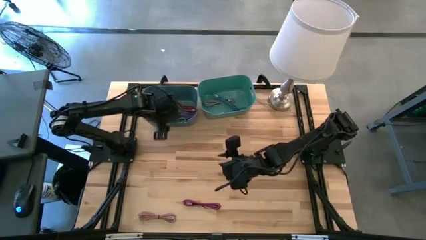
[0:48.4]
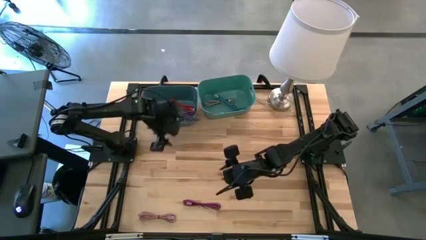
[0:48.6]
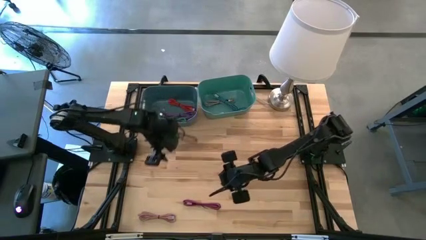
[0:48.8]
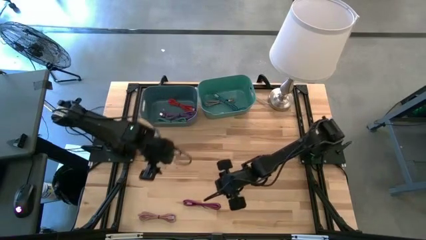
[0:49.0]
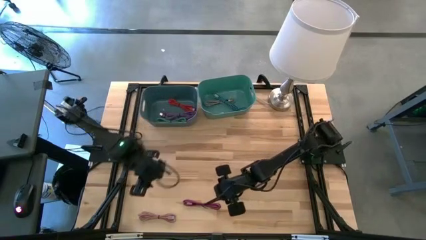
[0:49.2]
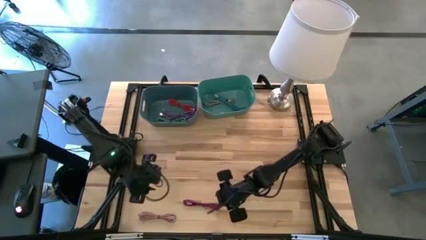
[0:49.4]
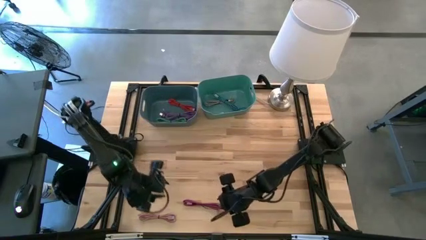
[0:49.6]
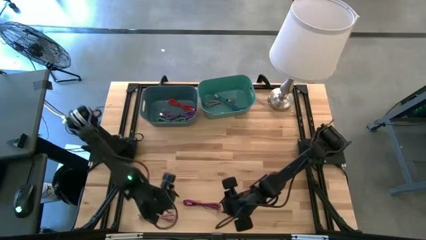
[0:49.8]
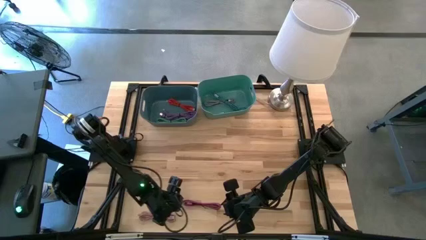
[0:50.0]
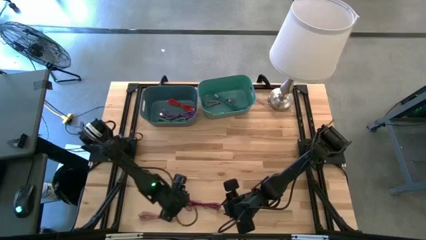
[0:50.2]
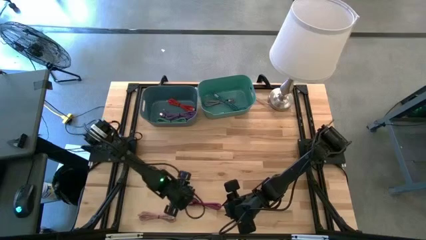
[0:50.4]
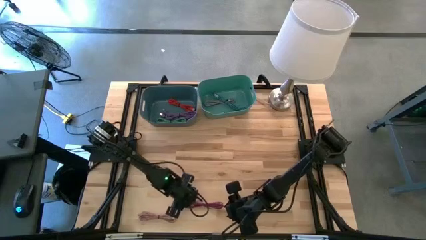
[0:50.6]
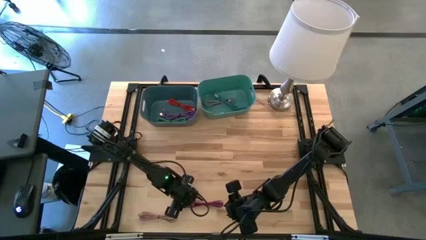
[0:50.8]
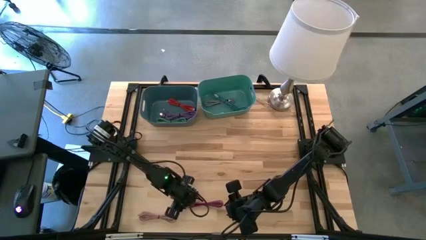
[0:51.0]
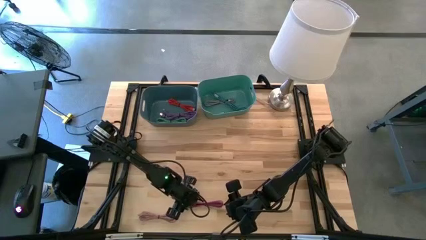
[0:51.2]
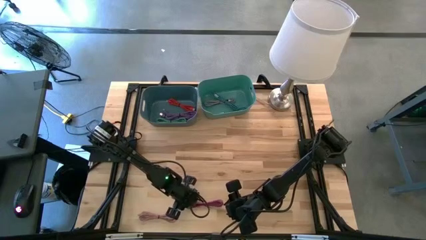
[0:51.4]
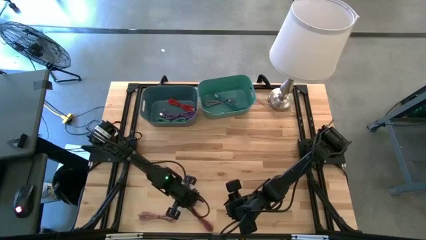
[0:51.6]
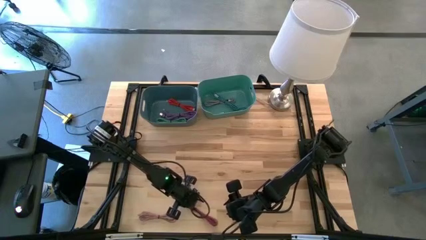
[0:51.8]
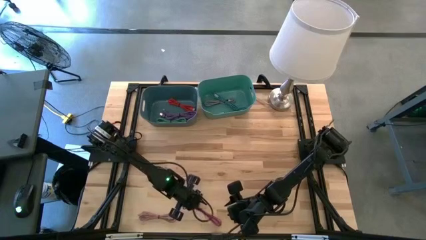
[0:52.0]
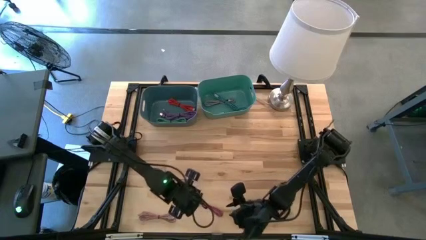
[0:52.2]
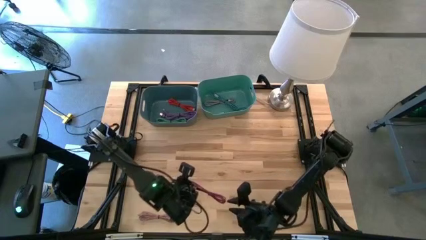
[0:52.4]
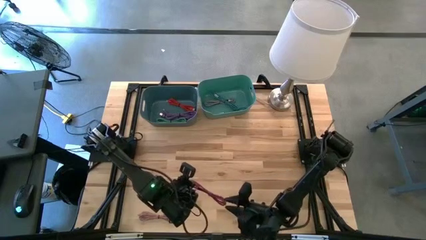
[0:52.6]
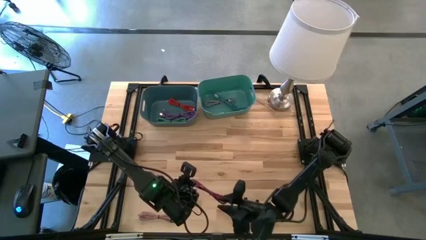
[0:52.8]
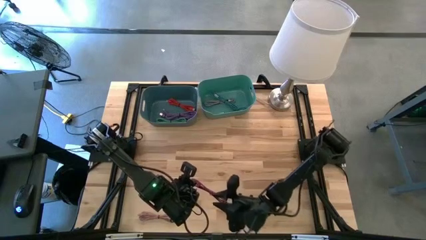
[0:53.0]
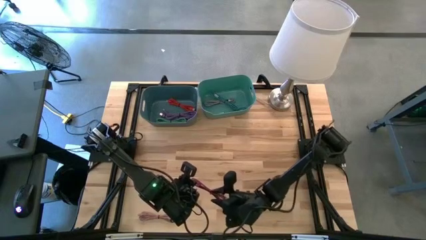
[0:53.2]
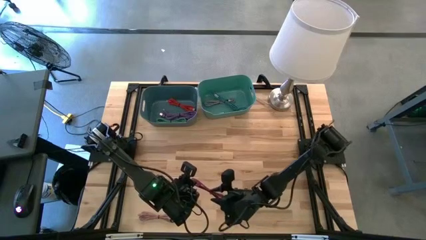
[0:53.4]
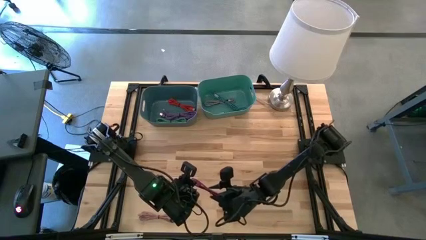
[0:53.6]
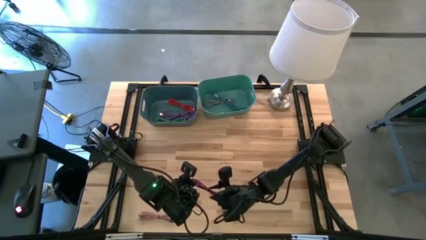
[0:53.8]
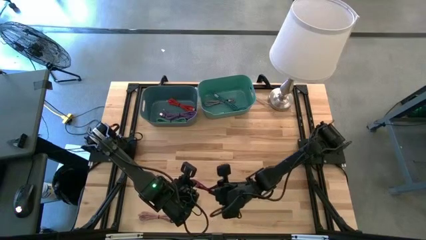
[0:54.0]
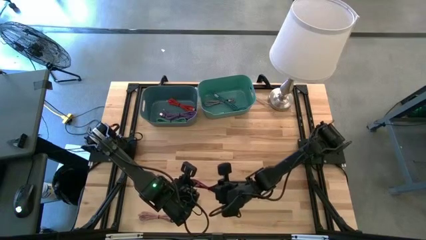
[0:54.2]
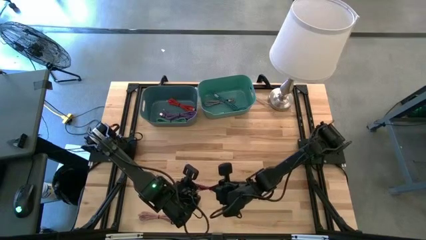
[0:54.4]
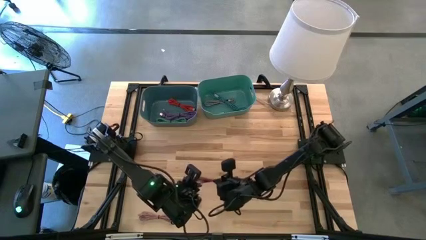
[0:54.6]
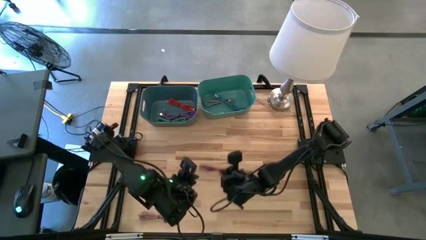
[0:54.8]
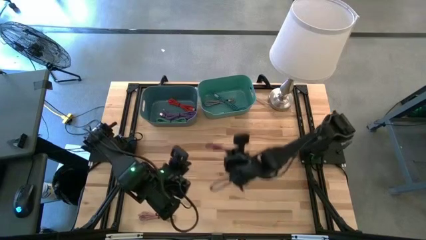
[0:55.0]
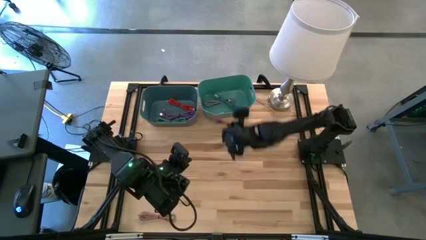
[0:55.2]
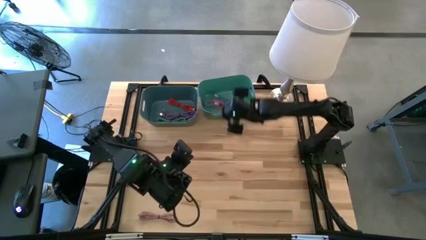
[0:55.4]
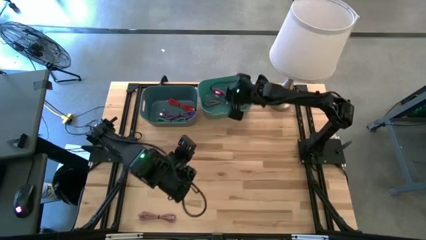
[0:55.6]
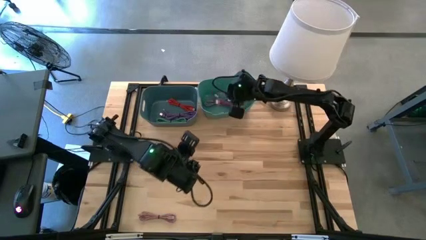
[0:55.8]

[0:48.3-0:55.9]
Task: Pick & Place USB Port
Put the black and pink charger cable into the green bin

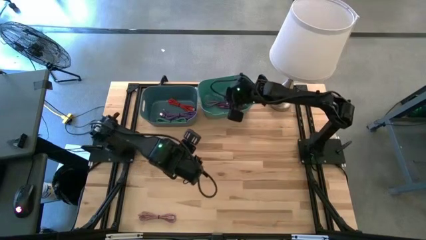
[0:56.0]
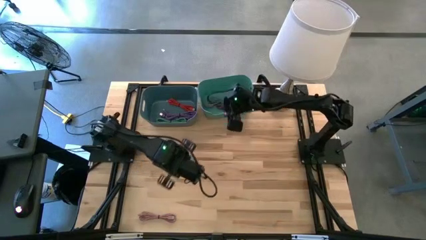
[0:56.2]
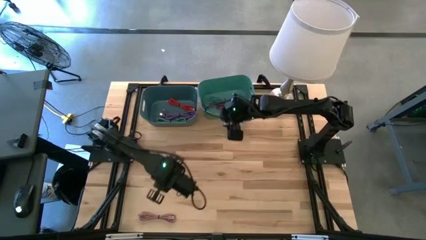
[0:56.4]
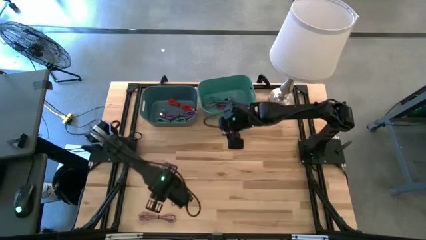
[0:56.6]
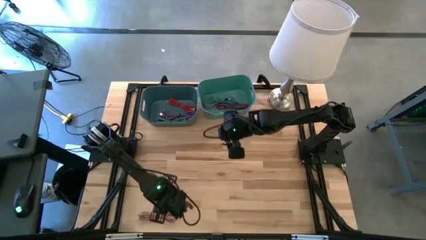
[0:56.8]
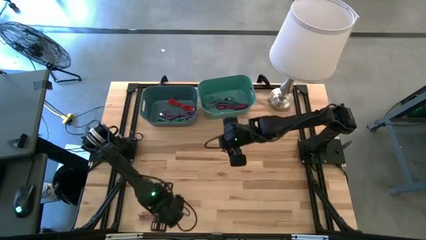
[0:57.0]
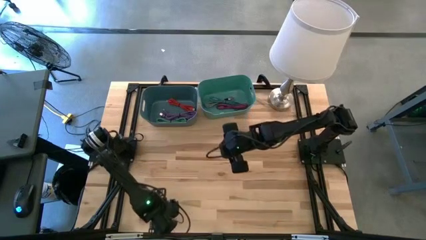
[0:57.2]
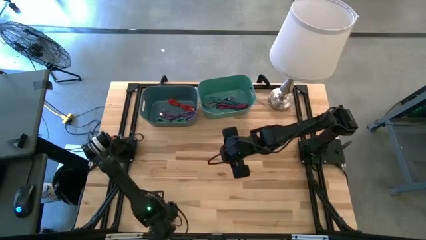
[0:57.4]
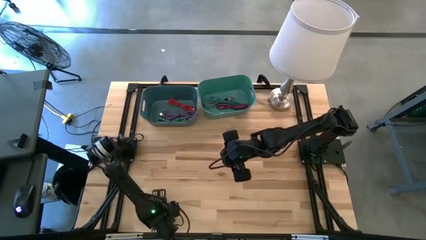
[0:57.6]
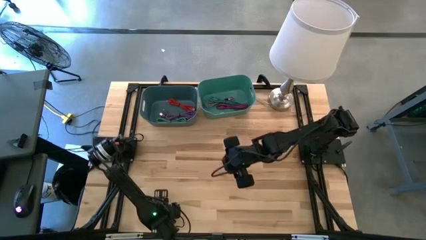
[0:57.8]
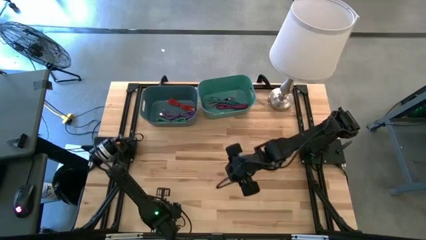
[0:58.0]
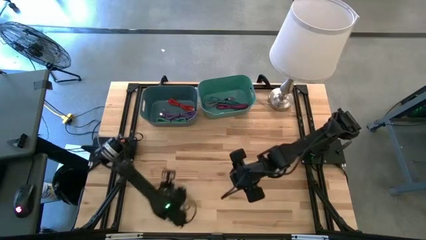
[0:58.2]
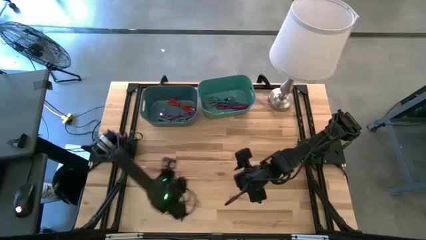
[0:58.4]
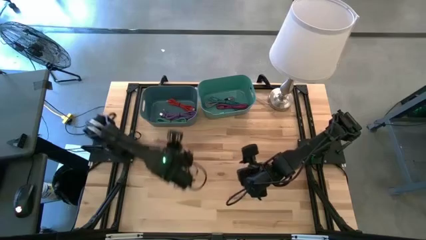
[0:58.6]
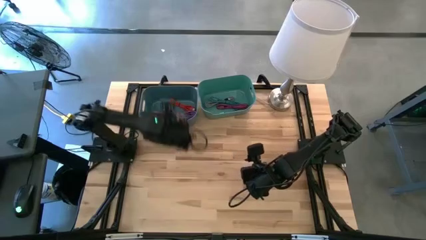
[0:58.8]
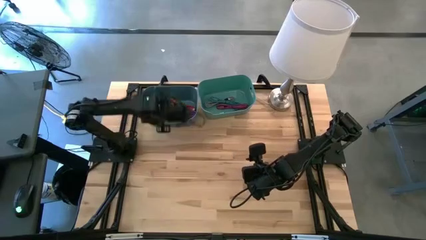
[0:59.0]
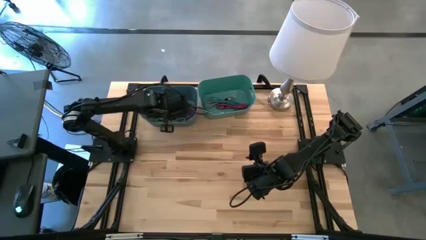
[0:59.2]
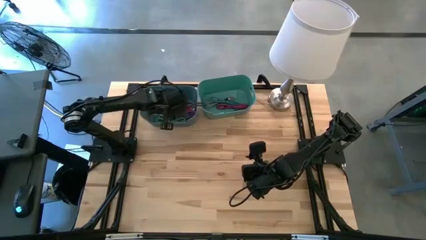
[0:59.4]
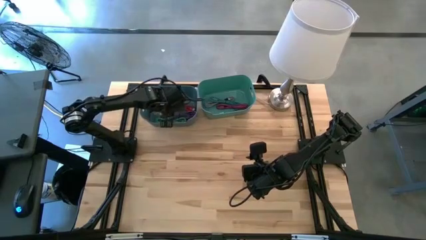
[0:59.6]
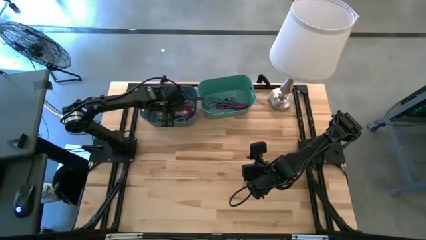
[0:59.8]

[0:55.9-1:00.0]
Put the pink charger cable into the blue bin

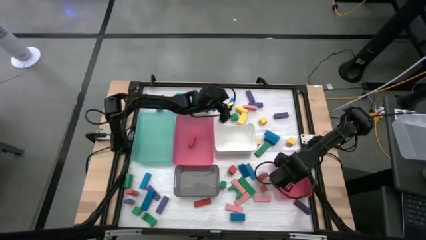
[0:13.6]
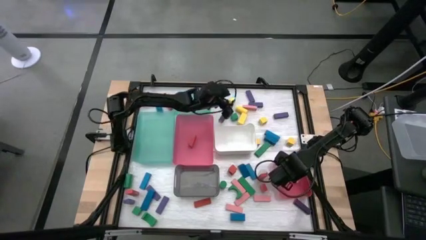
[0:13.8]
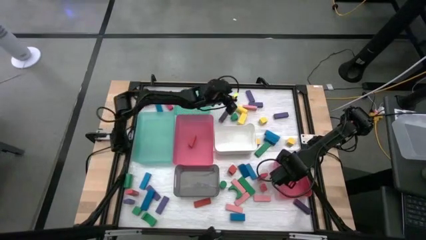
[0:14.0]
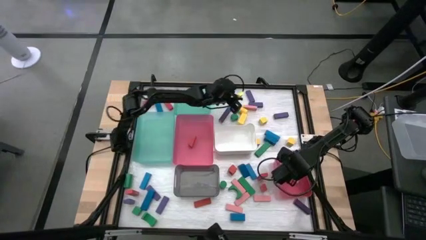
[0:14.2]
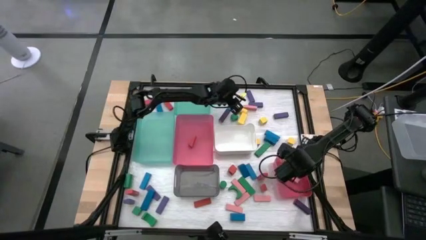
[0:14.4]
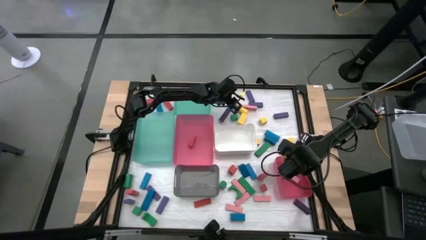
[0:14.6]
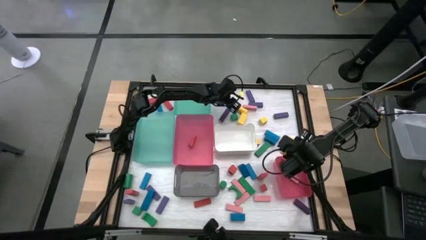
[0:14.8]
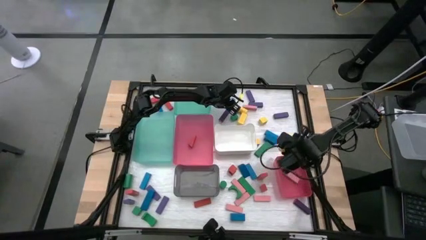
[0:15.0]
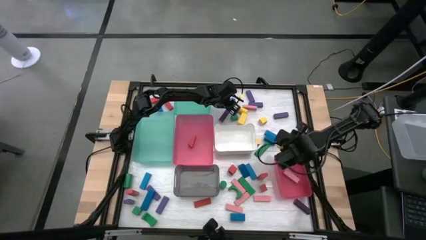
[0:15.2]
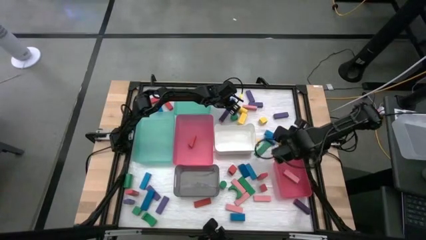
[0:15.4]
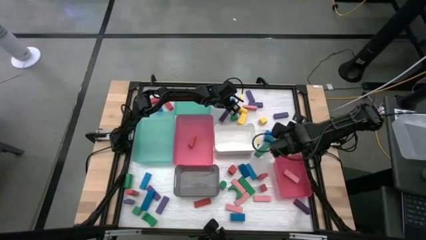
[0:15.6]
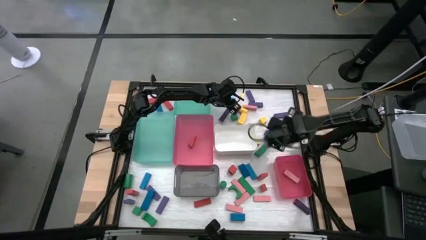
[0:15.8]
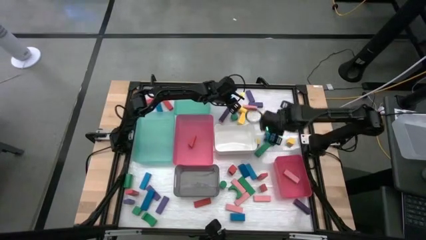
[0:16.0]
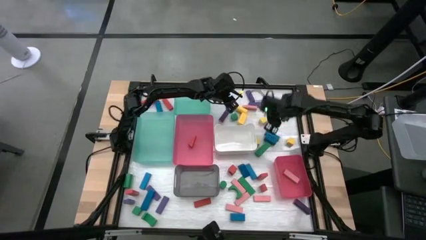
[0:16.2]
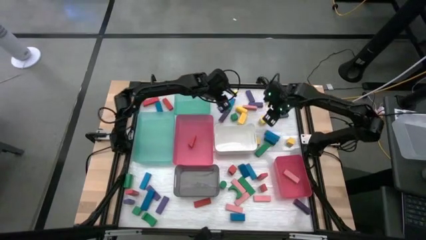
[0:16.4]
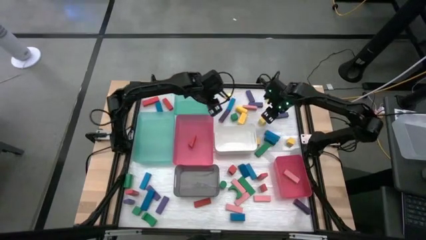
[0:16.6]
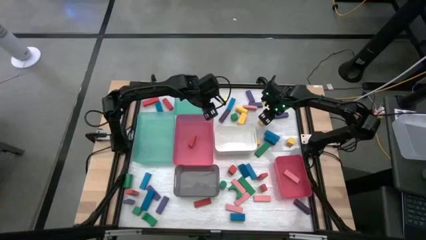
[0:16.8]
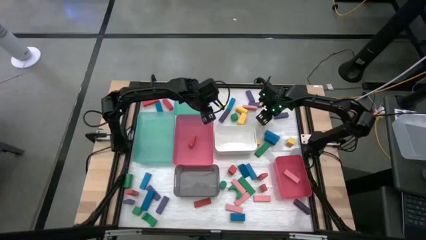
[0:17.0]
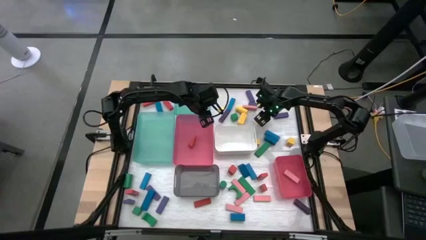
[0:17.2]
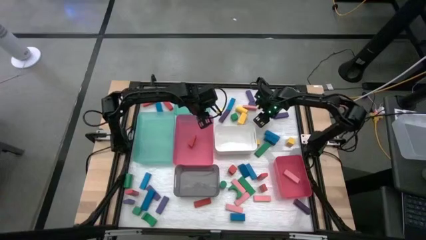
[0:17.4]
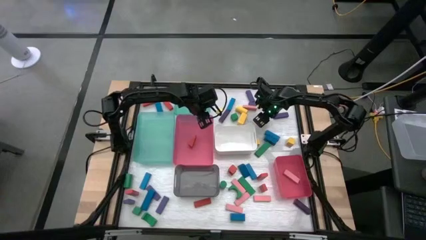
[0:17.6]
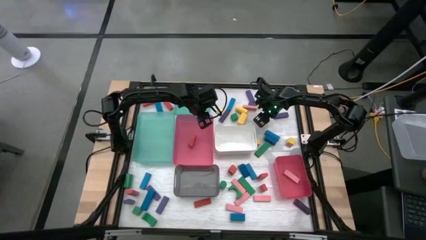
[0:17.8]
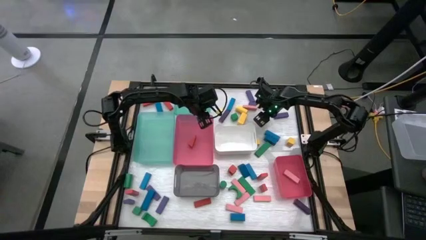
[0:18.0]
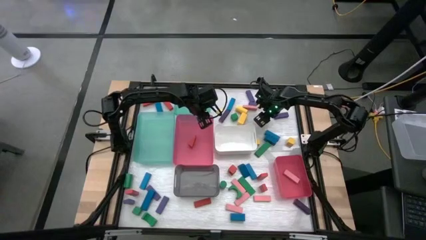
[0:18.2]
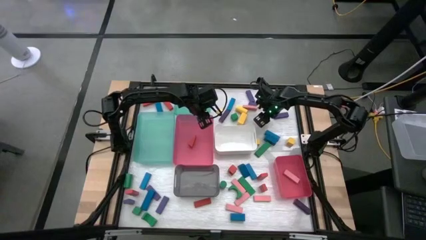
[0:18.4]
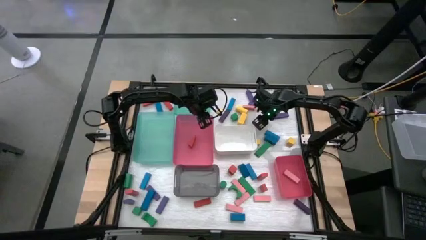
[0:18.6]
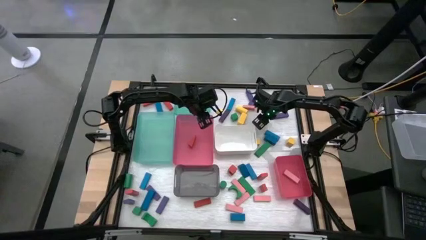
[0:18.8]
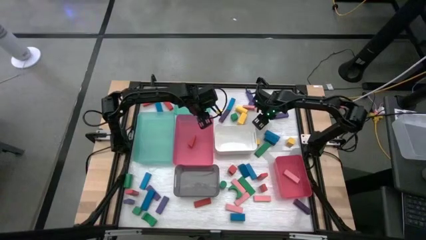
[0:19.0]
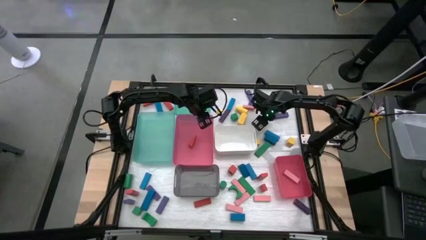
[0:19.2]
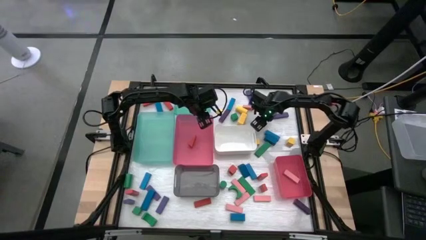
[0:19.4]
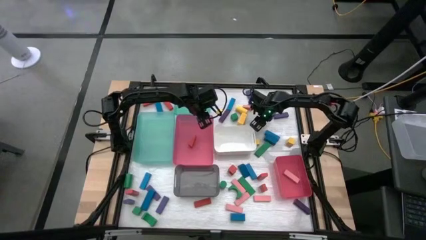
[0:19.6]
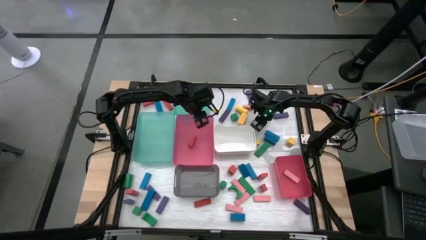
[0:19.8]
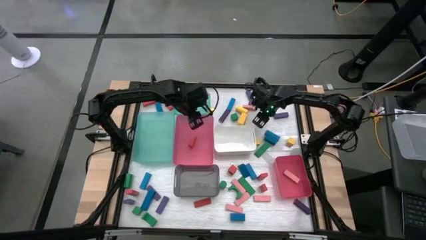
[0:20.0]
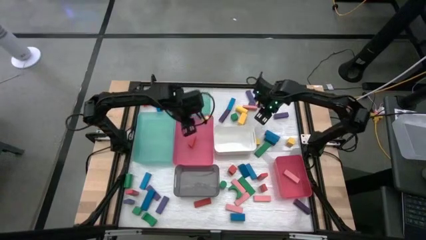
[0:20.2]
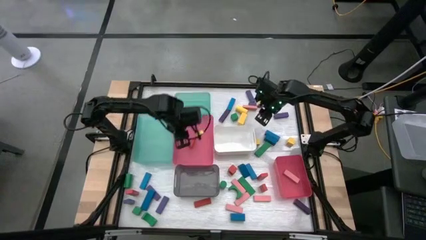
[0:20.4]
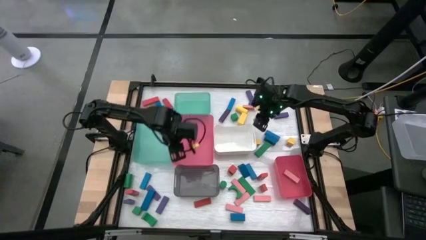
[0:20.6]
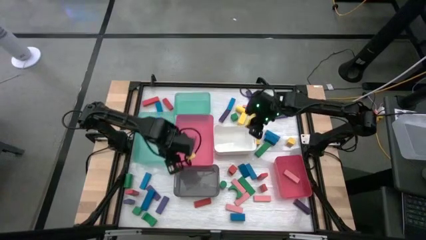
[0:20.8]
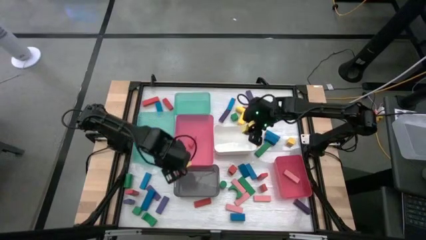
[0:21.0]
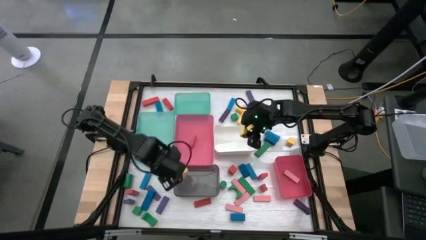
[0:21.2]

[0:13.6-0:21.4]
Task: Sort blocks
Put the yellow block into the white bin
